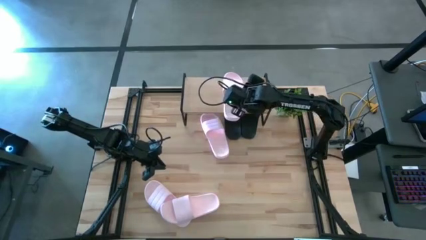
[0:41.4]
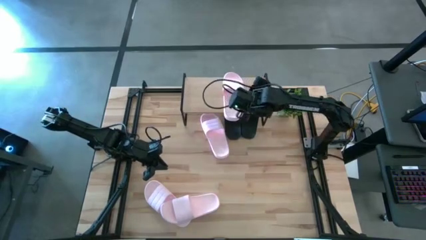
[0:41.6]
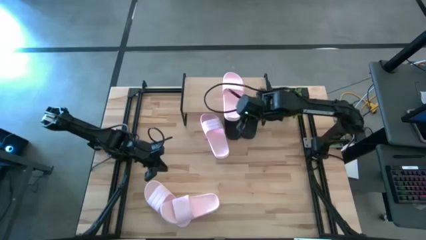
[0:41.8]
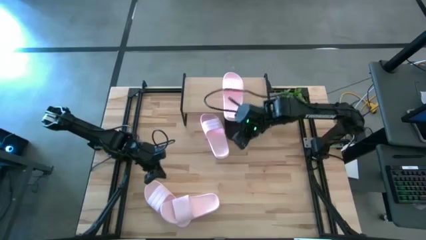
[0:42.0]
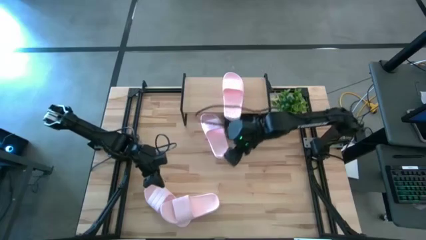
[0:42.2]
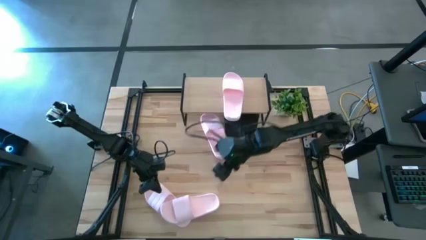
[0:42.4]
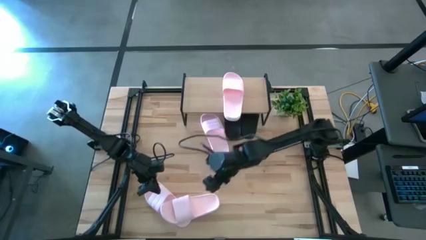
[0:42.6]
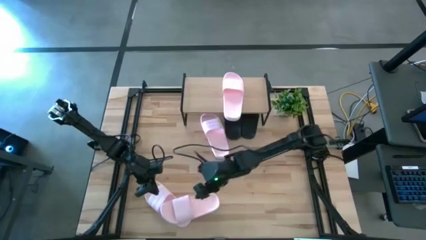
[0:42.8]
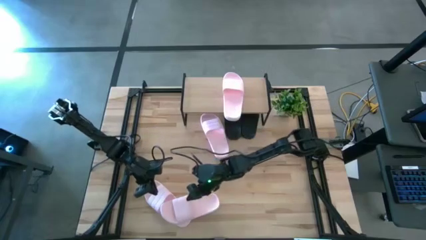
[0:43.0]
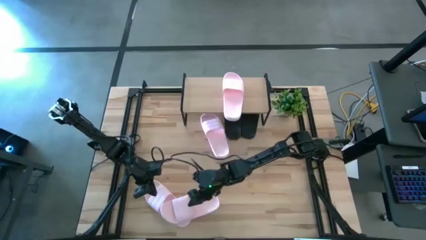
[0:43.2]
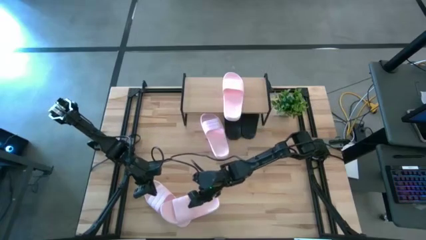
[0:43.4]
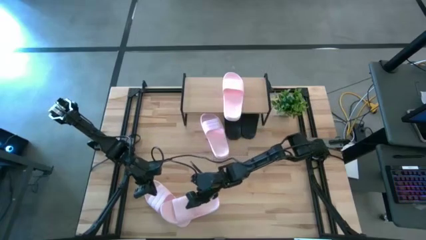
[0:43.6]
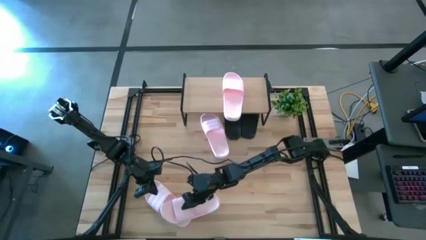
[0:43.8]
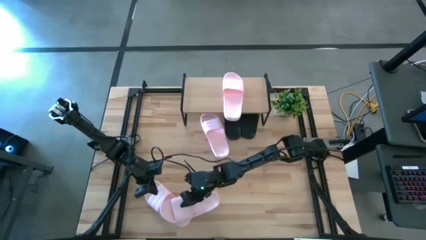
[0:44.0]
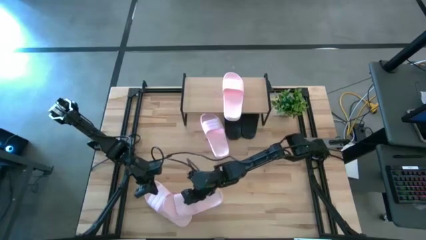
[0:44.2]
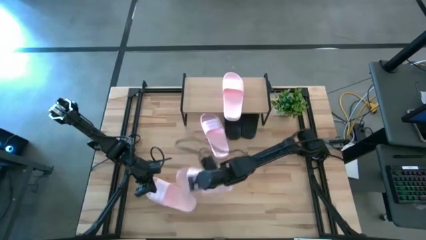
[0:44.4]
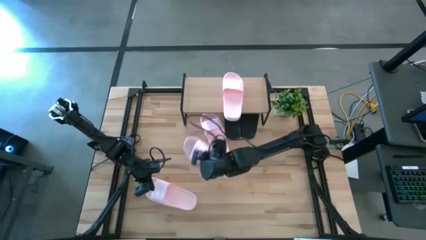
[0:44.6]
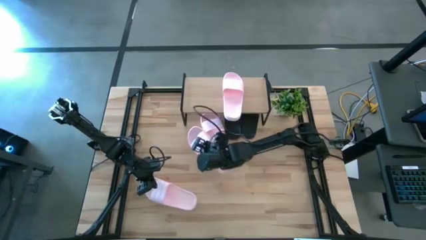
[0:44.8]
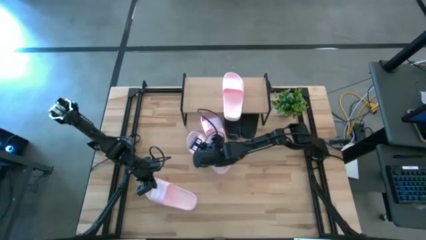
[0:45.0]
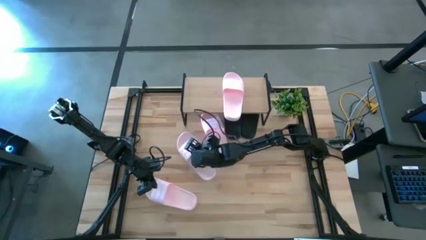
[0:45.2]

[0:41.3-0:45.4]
Task: Pick and place slides into the shelf
Put the pink slipper under the shelf

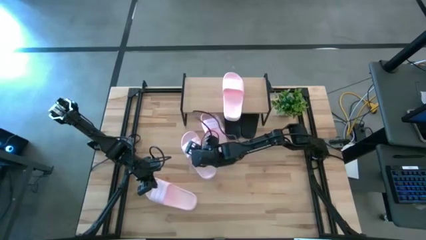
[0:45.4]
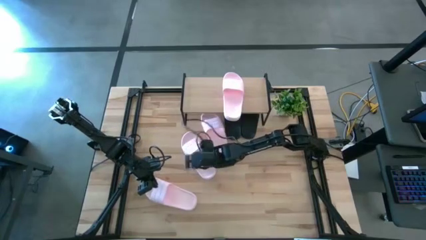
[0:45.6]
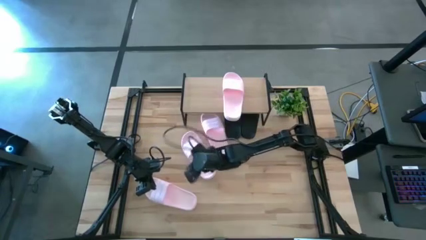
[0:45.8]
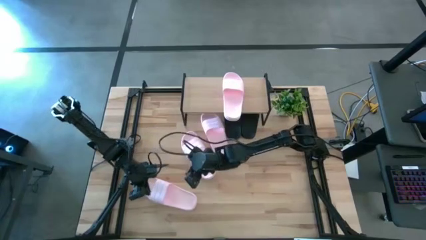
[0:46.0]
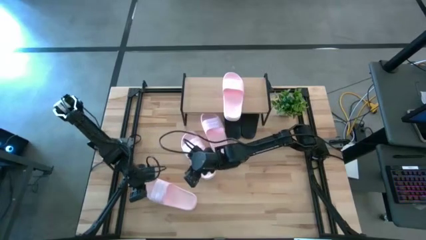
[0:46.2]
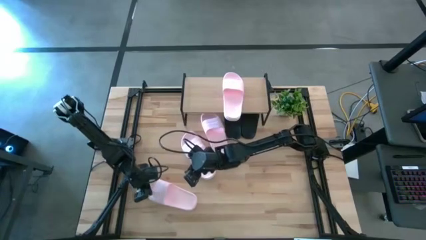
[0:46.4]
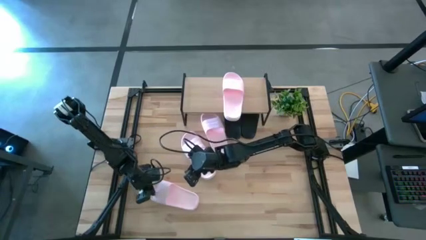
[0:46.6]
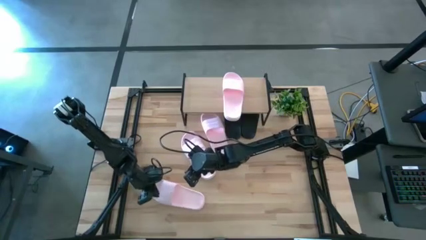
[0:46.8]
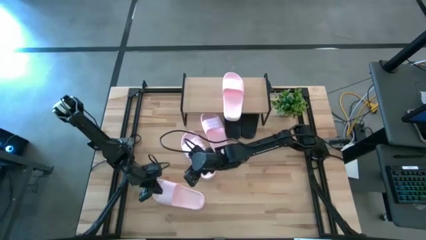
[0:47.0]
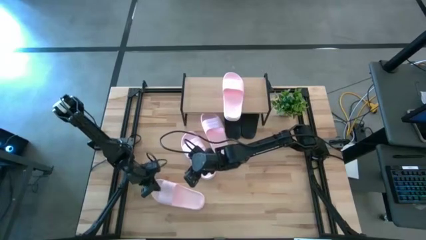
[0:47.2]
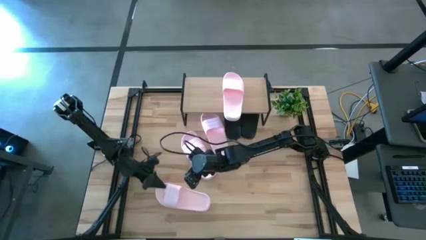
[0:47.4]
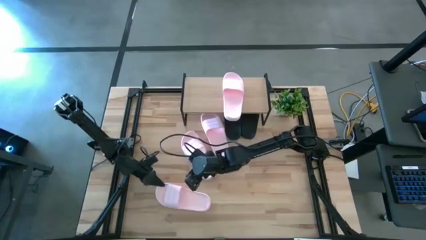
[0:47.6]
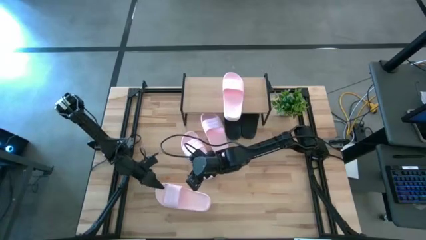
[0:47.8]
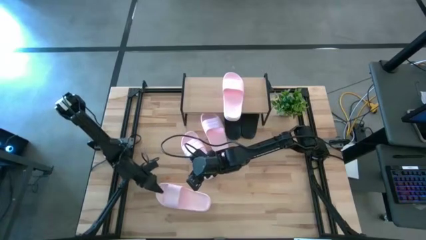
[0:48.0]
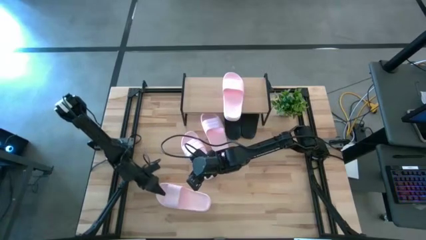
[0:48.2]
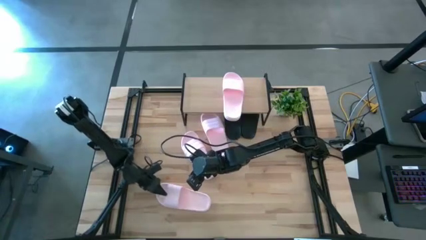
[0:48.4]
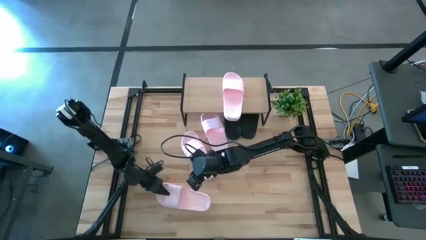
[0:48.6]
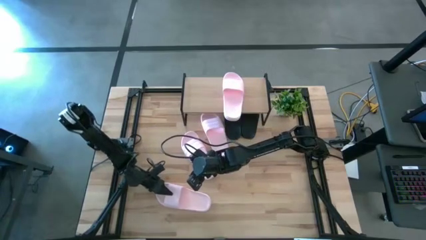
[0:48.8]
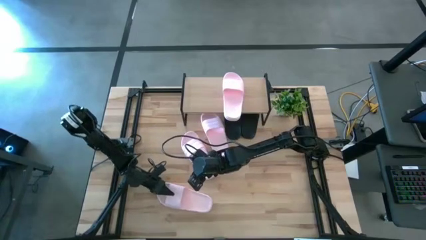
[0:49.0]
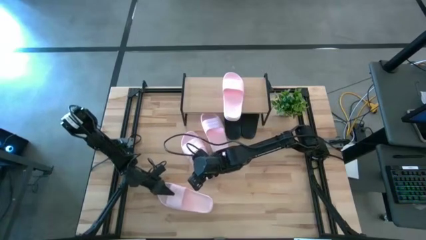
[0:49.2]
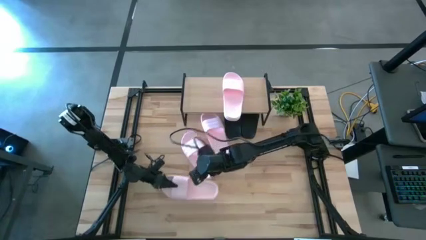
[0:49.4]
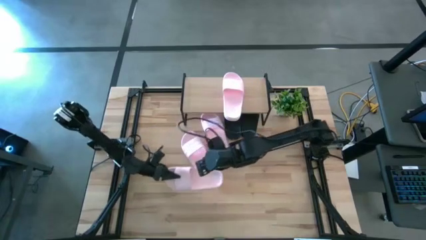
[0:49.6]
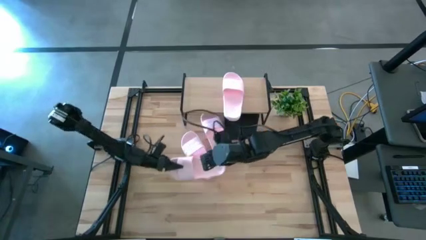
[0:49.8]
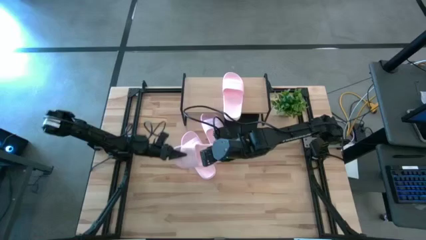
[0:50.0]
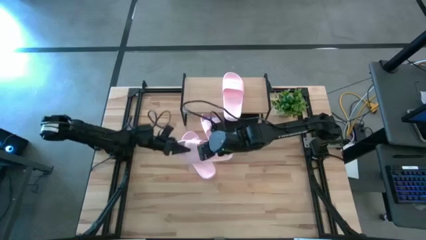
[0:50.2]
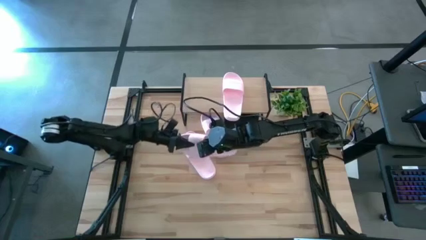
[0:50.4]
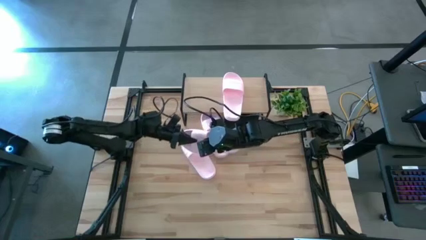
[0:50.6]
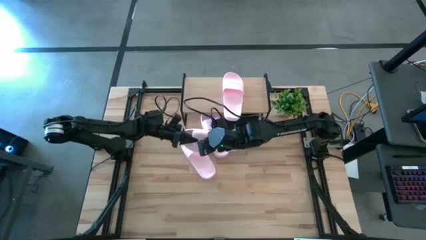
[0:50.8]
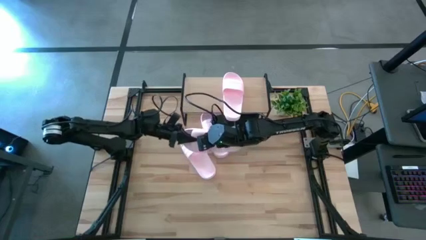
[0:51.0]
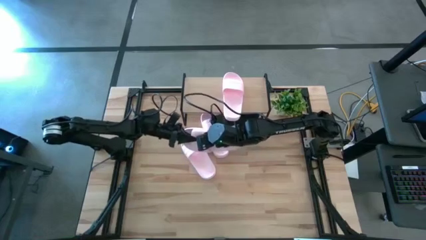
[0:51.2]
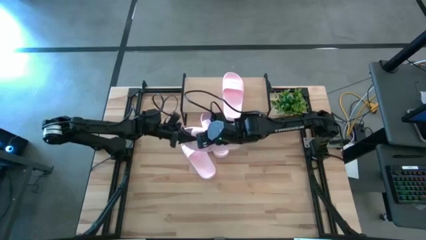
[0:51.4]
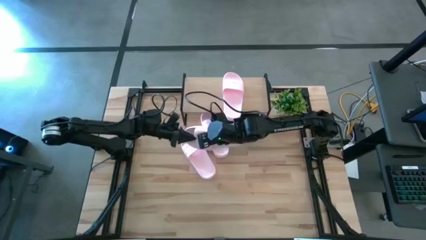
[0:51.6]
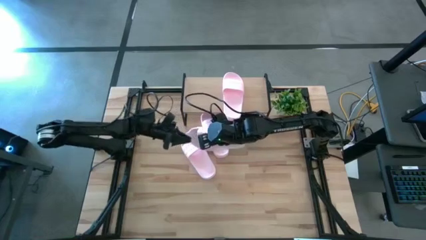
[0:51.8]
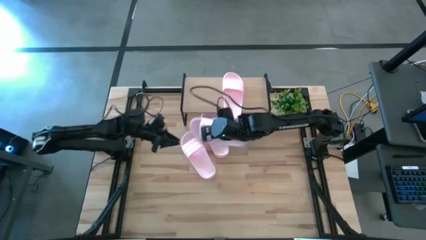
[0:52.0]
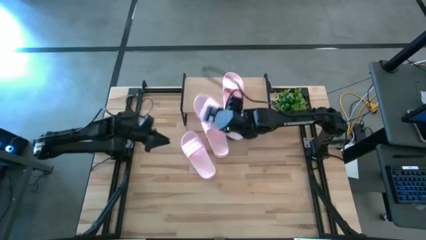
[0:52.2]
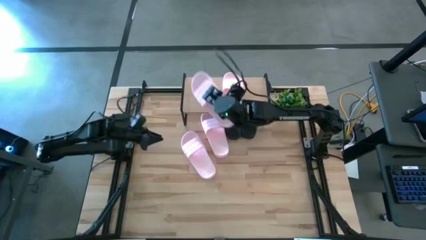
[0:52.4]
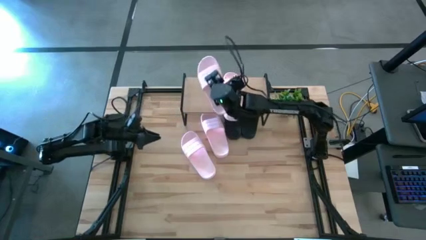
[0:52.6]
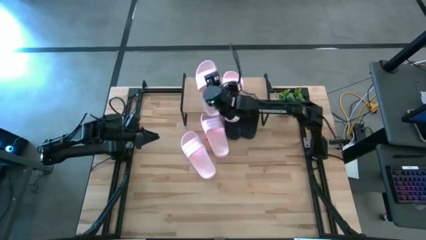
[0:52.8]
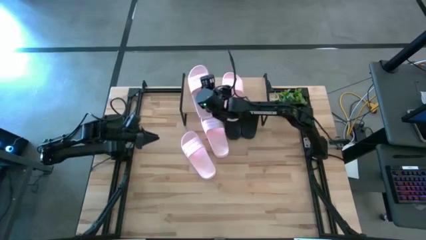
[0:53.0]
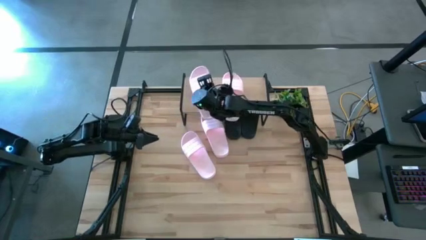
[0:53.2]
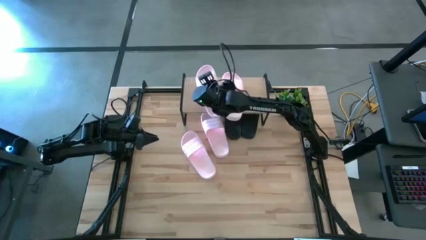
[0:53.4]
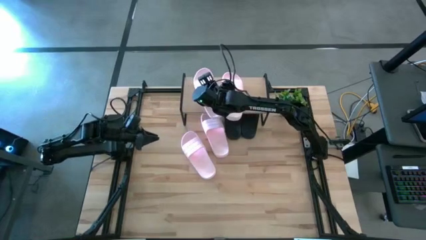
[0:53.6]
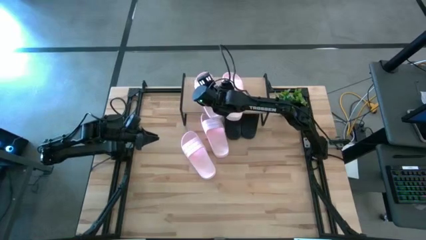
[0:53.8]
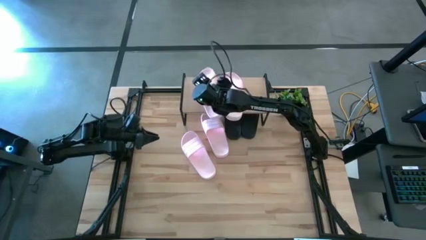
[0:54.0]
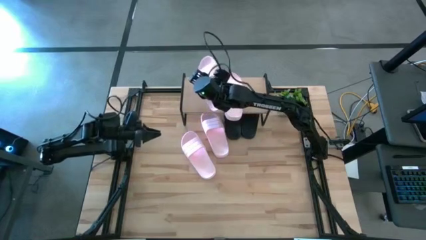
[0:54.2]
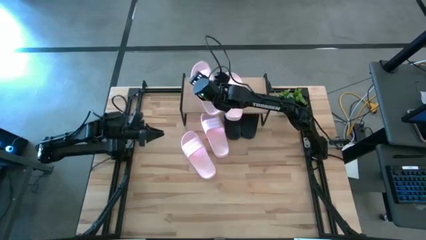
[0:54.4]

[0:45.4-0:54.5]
Put the pink slipper on the shelf

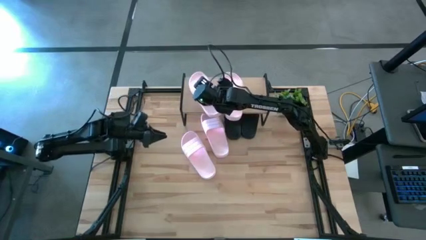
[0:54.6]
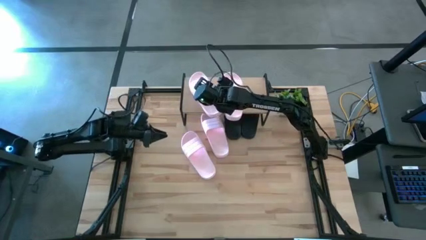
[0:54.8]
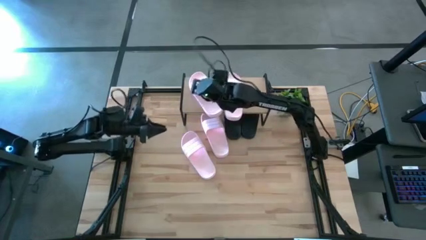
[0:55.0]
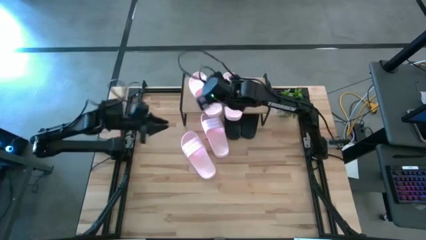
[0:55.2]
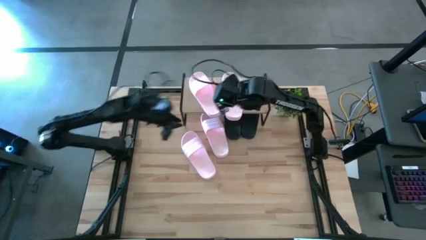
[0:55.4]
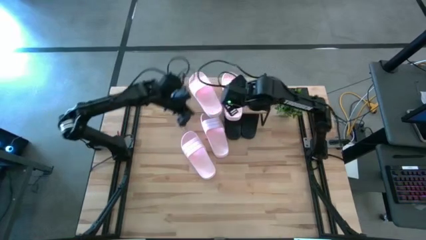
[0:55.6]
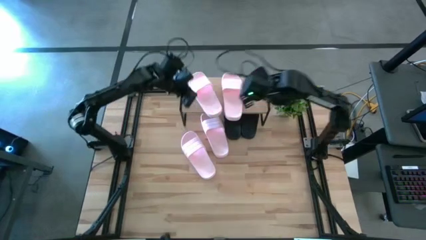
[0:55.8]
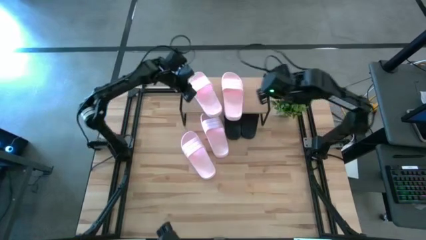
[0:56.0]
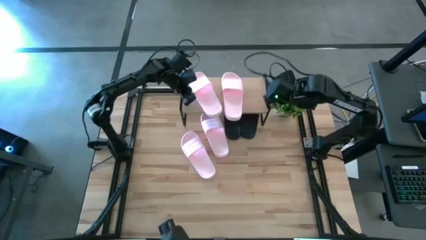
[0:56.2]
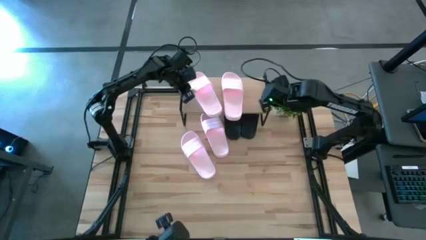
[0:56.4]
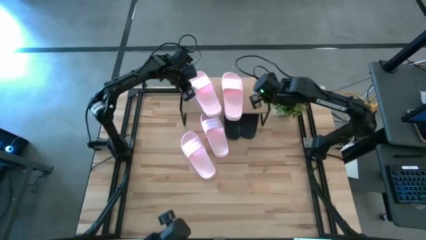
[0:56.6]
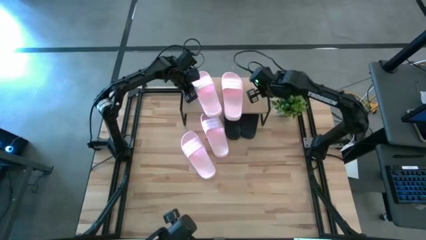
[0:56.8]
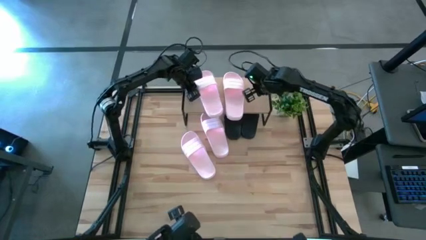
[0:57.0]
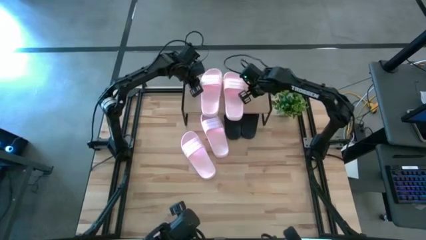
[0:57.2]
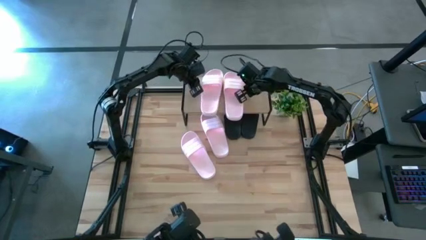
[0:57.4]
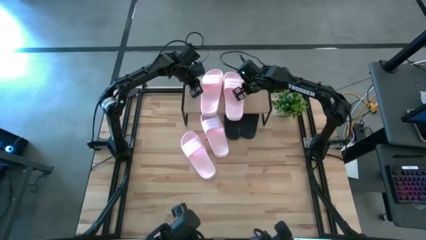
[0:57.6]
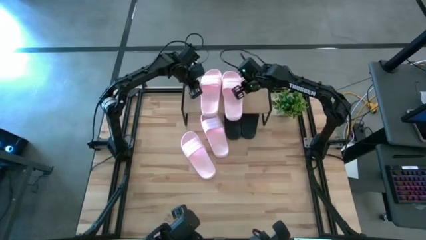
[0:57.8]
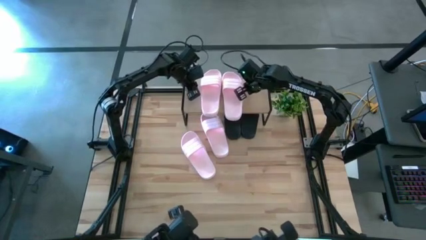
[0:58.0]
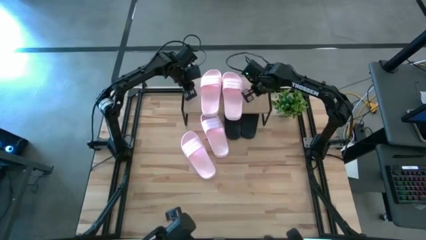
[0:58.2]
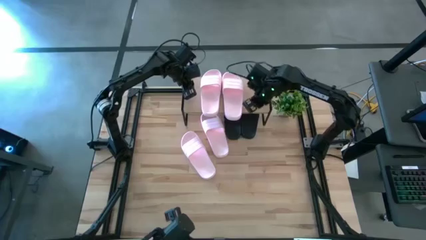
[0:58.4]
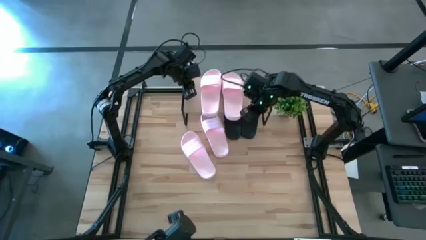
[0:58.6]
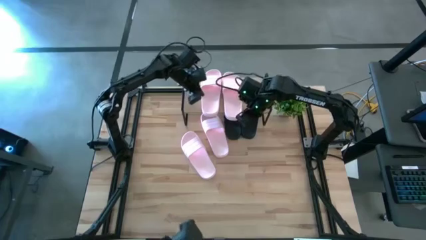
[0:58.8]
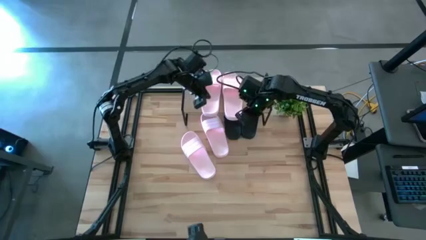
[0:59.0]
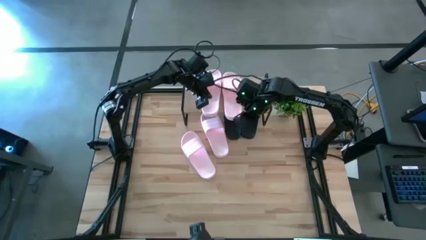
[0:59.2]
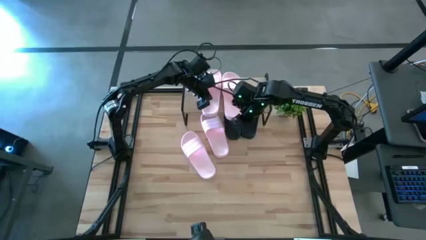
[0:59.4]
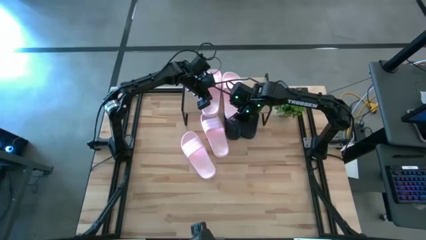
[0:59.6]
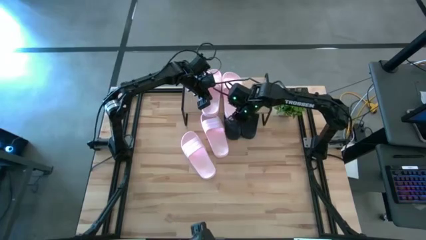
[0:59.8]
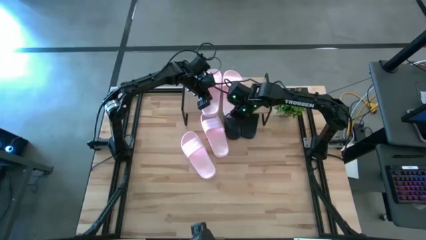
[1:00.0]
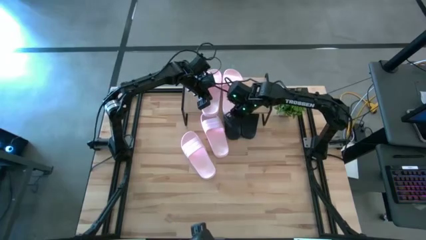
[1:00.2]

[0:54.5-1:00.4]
Adjust the slippers on the shelf
